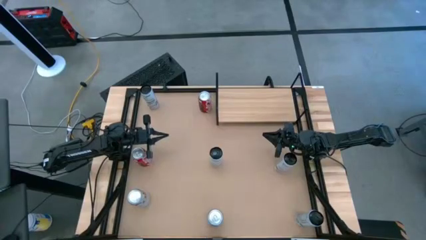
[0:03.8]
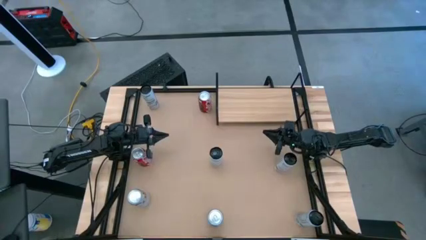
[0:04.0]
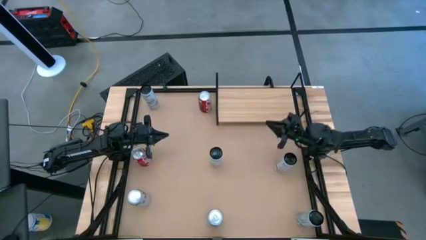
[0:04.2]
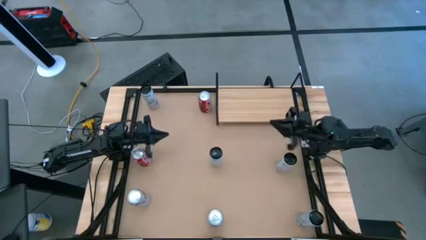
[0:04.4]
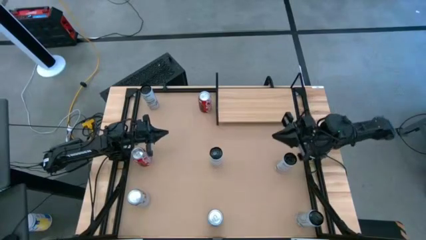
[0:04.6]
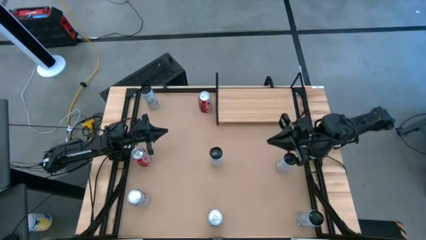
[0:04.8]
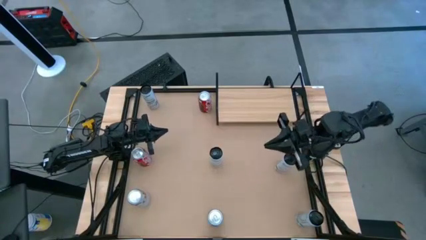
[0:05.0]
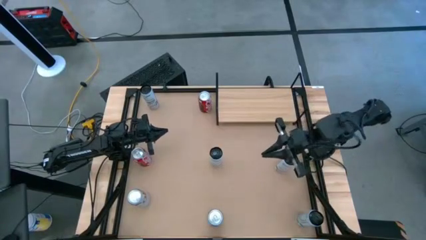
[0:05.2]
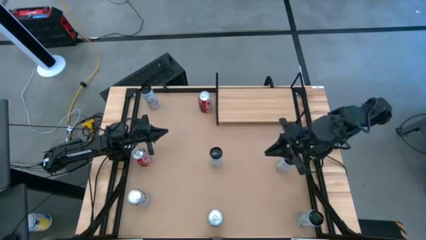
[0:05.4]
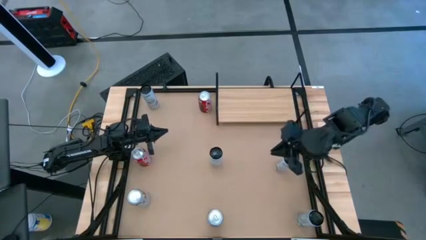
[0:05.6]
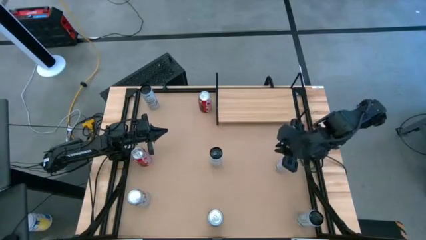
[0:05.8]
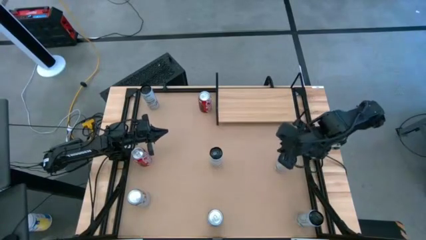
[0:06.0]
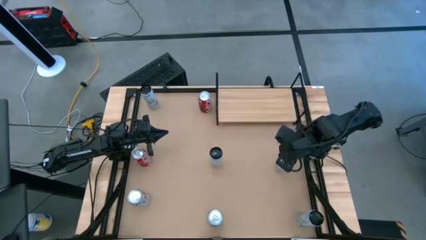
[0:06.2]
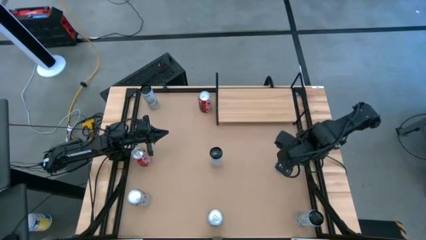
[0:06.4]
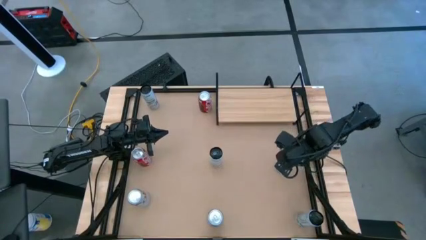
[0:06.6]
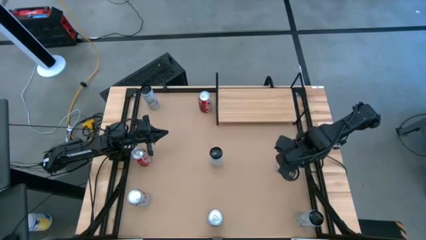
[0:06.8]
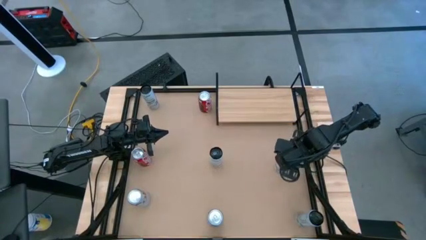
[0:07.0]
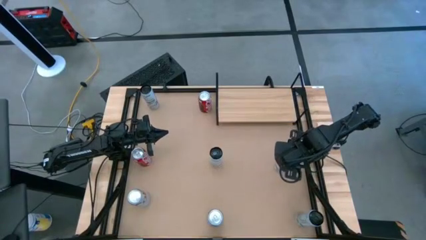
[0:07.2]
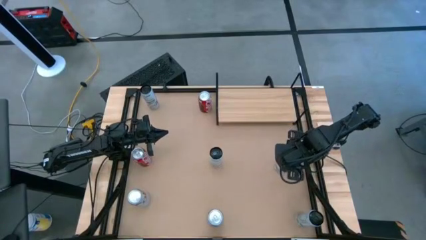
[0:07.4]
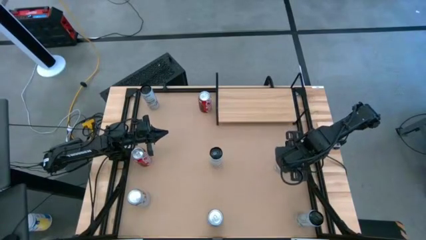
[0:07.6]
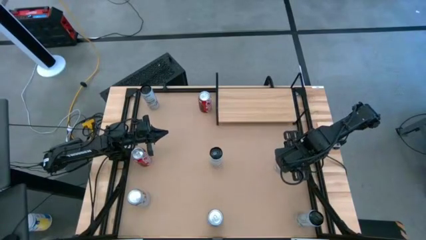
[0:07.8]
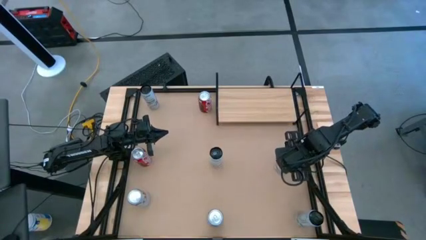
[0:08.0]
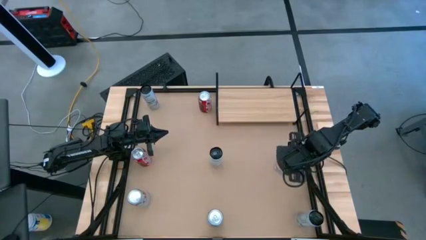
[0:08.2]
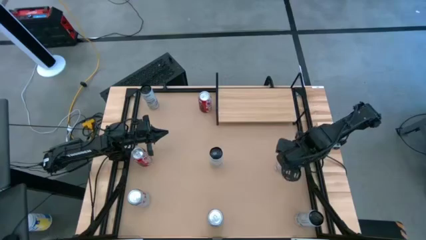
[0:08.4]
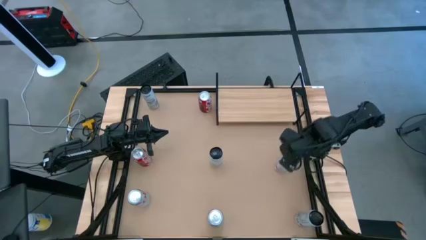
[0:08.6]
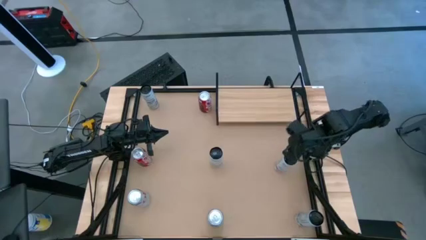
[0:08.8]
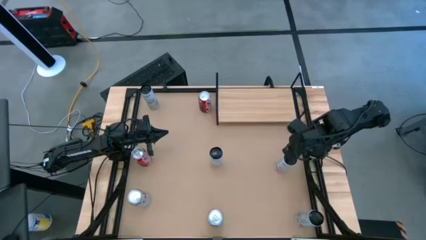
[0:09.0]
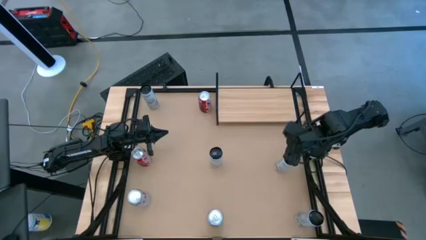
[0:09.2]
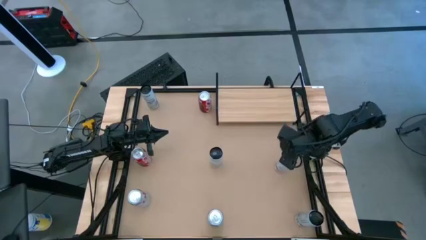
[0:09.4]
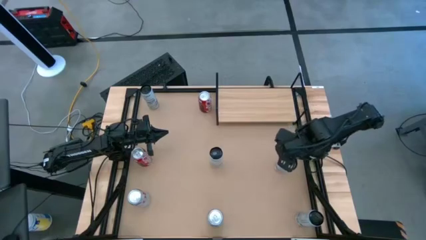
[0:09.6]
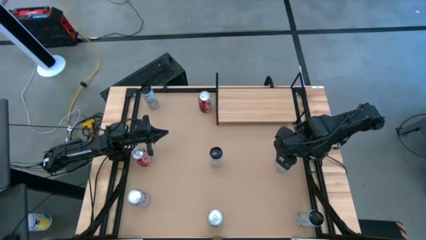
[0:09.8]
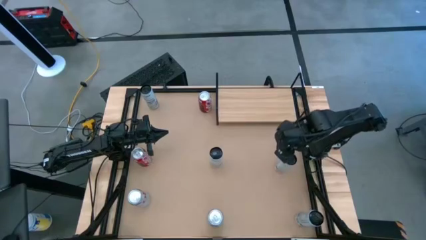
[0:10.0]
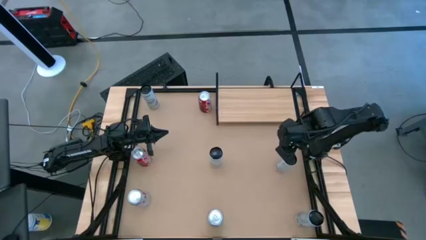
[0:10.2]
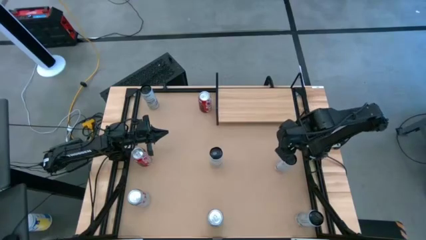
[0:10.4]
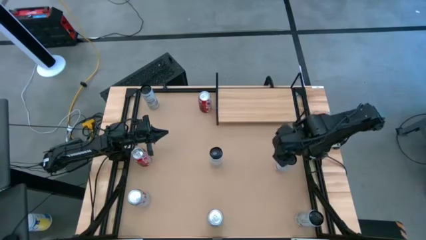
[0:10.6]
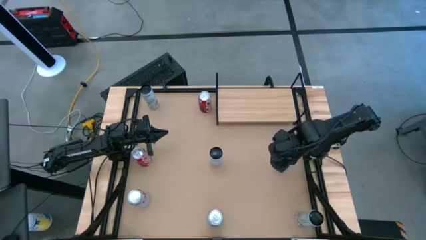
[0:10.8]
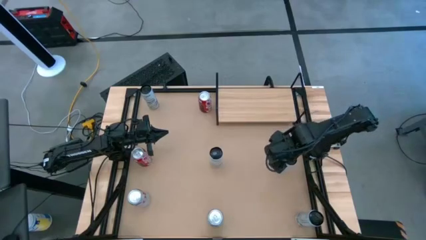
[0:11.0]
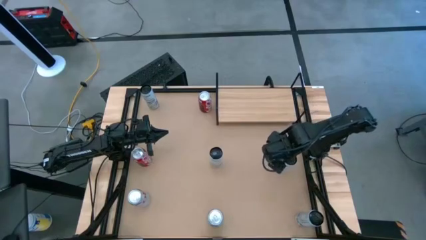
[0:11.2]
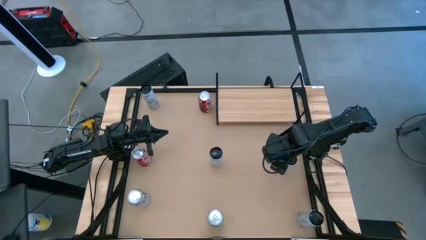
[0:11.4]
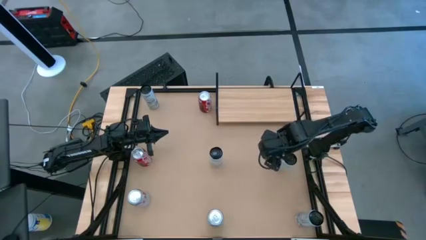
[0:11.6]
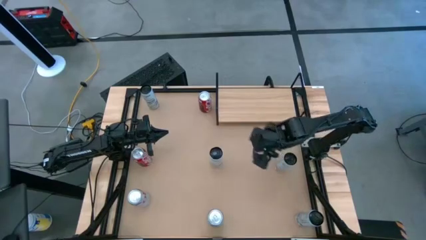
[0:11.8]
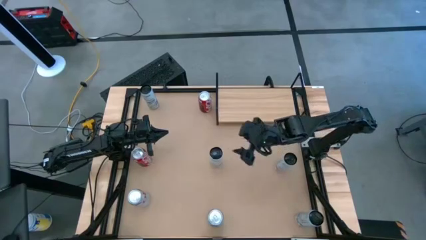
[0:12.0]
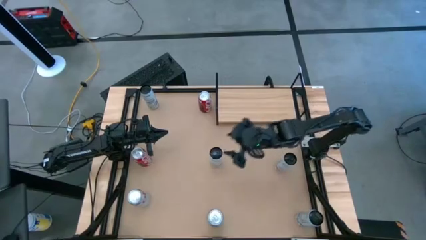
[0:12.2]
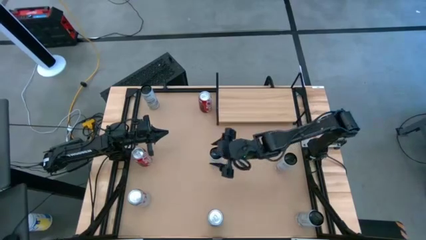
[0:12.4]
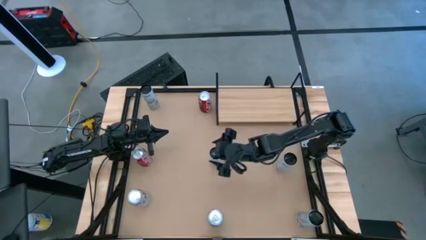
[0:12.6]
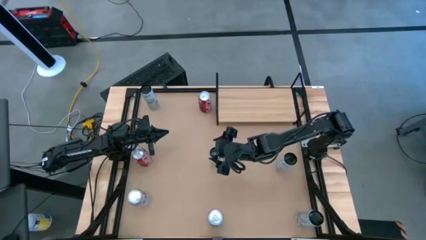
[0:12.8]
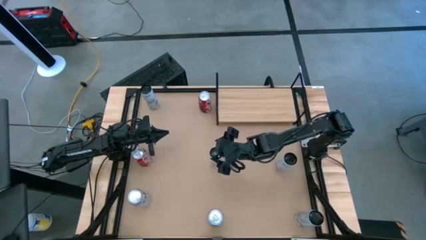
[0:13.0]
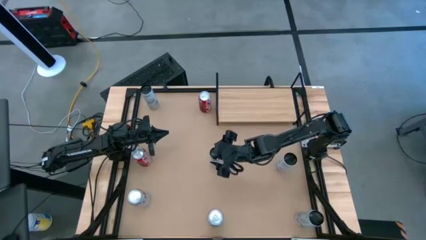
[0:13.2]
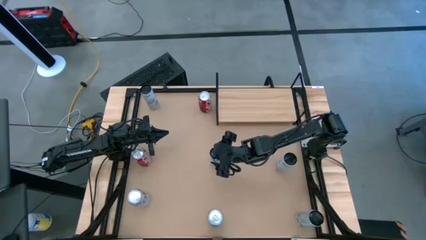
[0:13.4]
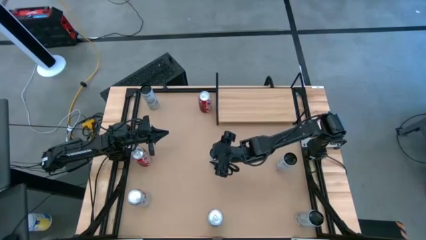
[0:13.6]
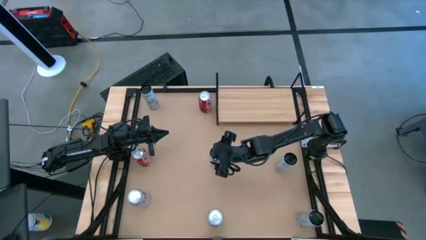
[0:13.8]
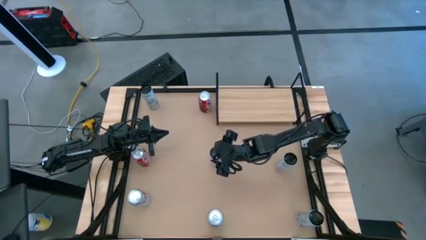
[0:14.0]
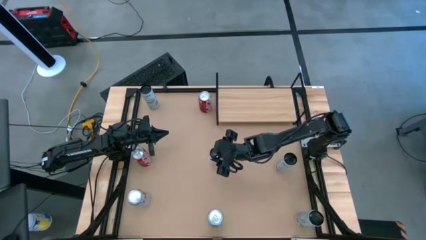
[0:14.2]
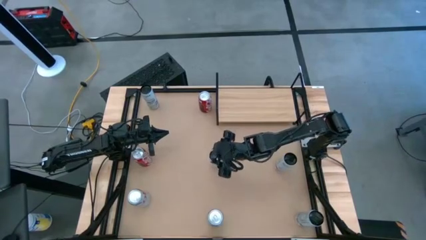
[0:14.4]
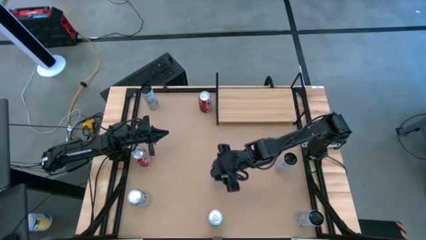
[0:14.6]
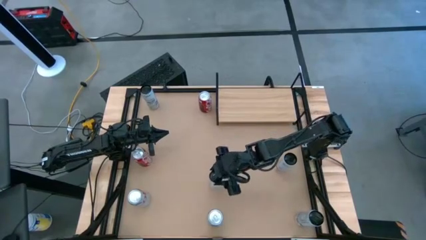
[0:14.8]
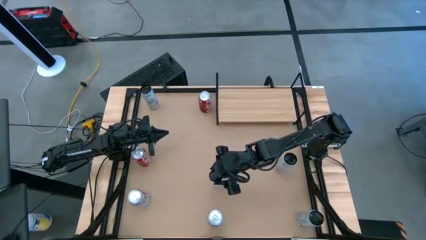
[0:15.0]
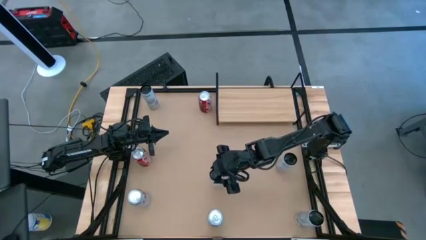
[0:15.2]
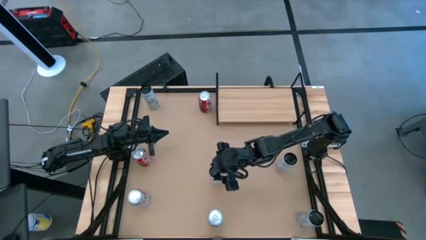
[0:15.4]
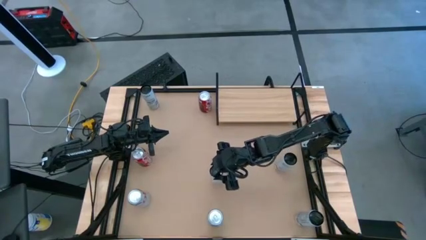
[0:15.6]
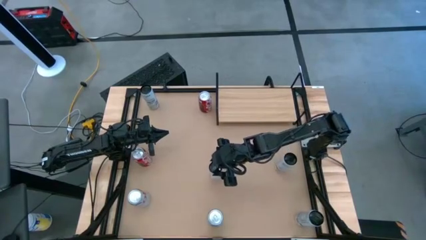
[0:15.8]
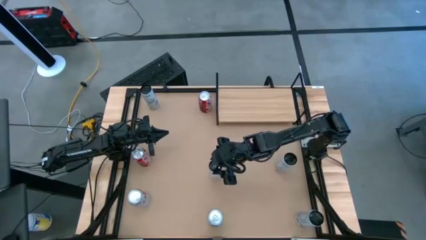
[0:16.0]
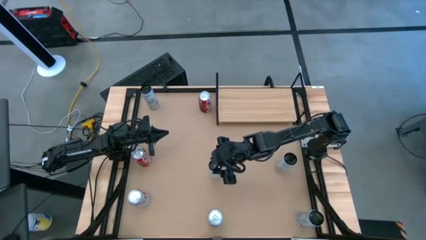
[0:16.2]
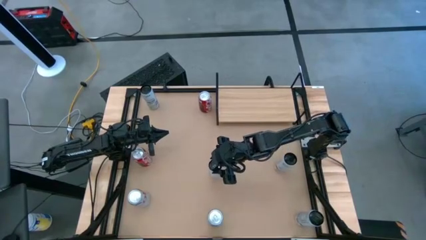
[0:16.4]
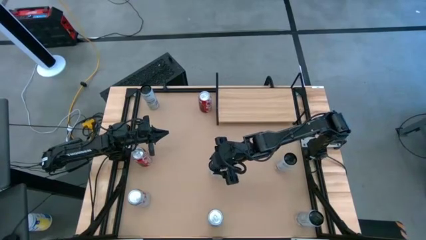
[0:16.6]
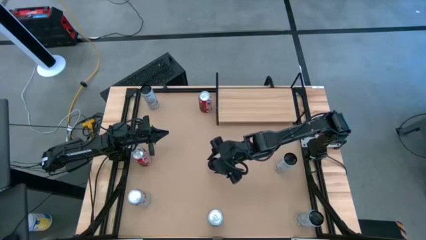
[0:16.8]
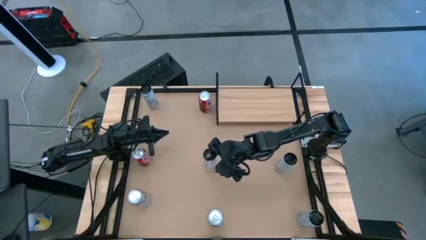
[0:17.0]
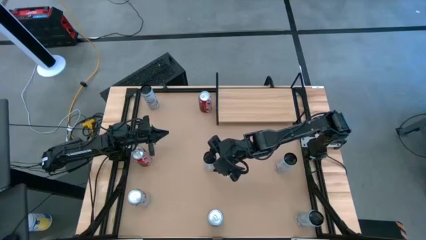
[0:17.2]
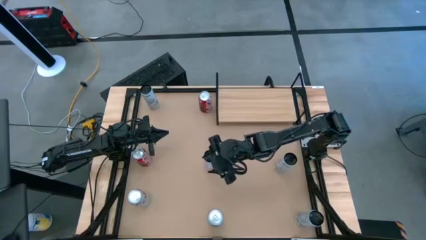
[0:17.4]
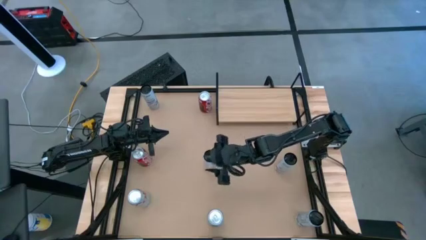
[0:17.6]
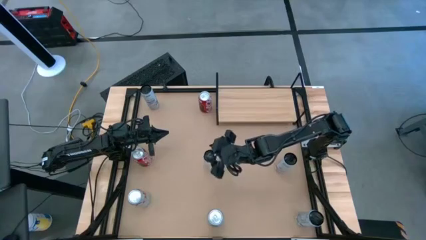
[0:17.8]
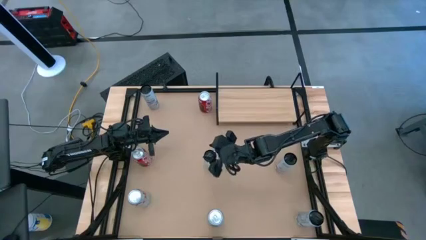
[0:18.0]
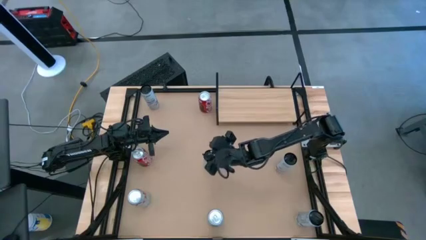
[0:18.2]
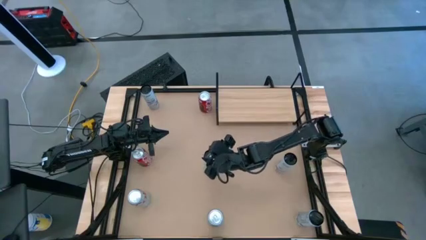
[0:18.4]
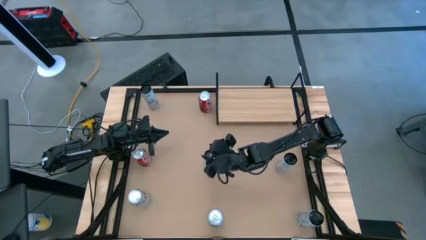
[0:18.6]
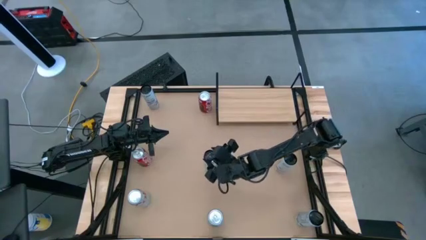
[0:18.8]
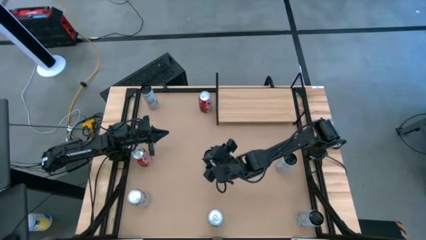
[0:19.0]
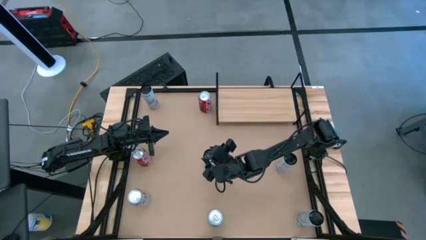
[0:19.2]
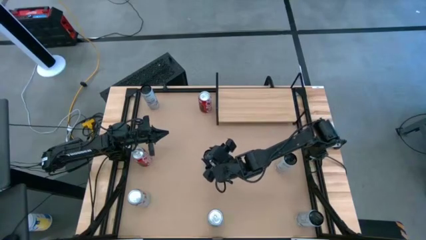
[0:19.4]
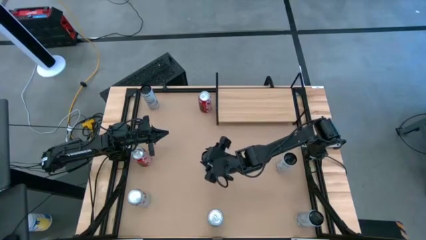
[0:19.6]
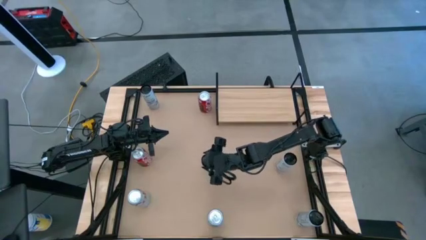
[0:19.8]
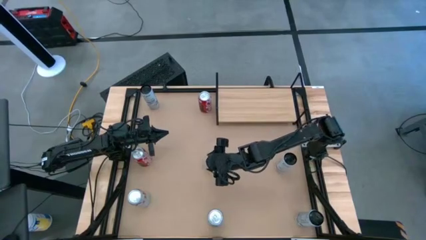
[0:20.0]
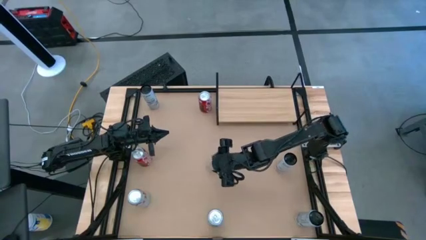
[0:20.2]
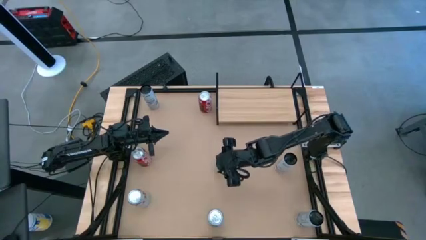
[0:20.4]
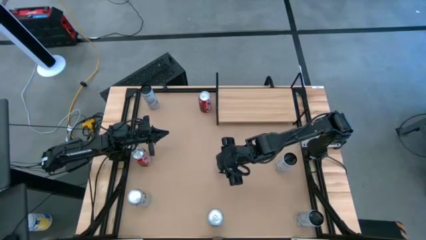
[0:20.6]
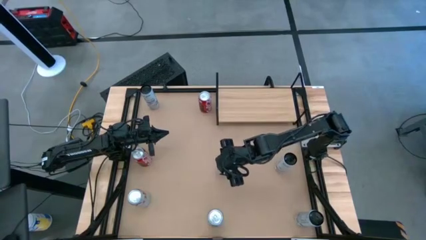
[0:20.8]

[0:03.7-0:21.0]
Task: Place canned beverage on shelf
Put the left white-pink soda can on the shelf
